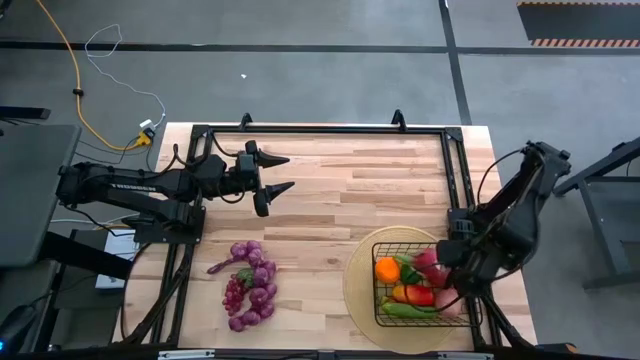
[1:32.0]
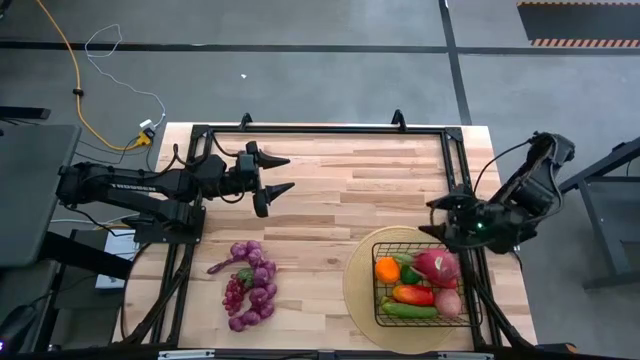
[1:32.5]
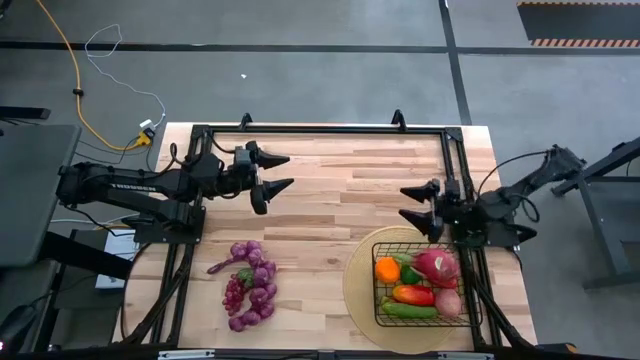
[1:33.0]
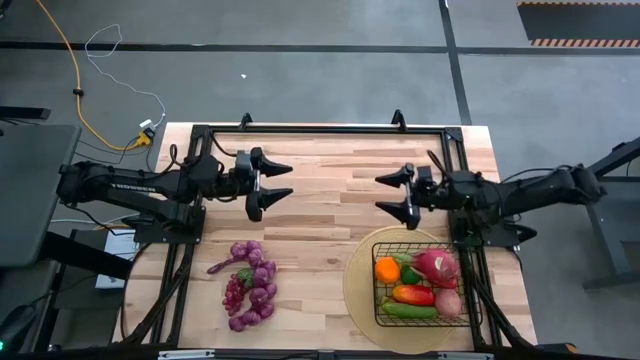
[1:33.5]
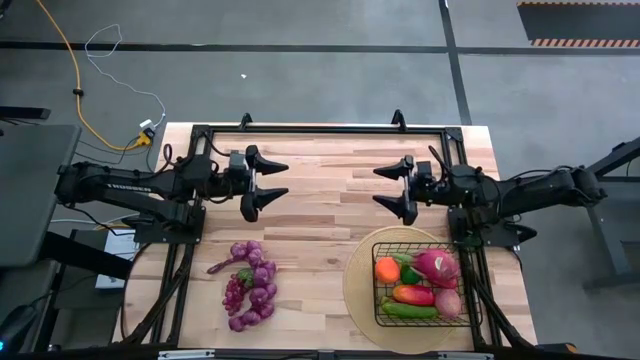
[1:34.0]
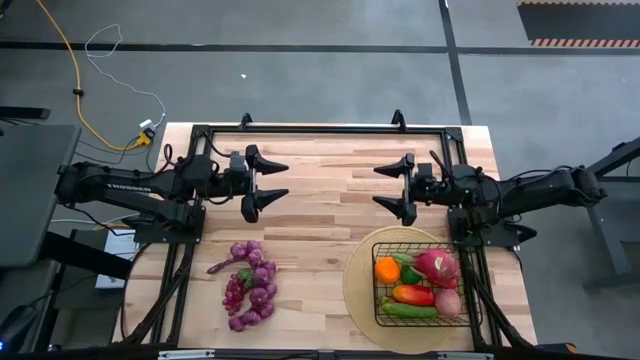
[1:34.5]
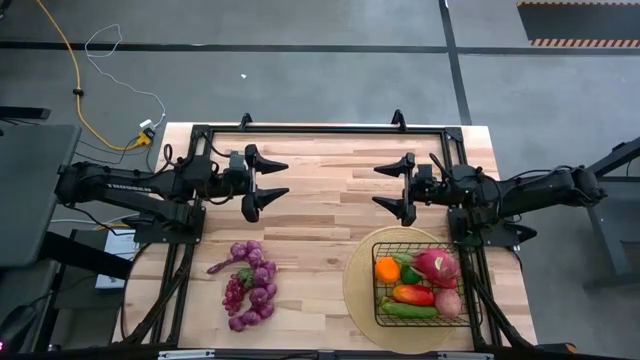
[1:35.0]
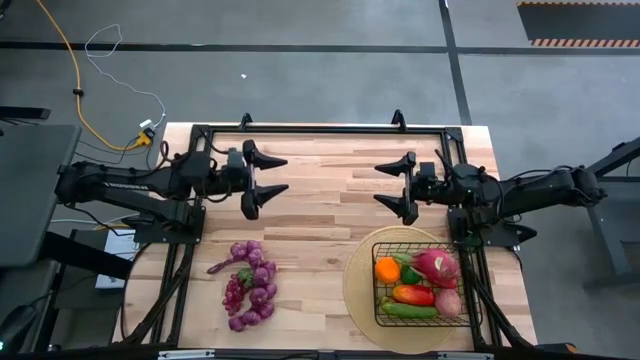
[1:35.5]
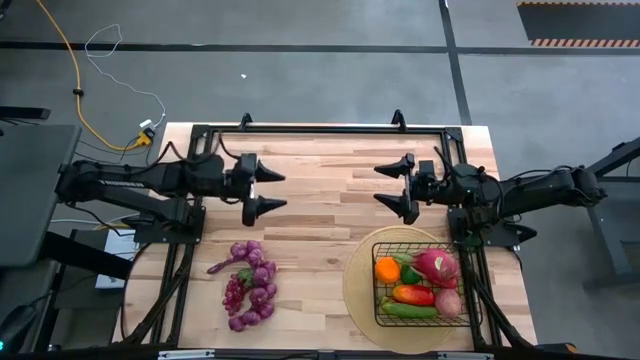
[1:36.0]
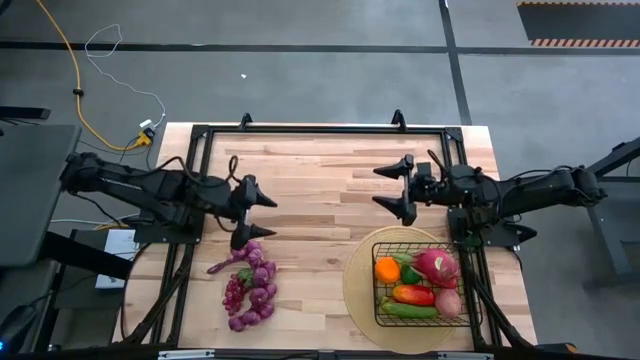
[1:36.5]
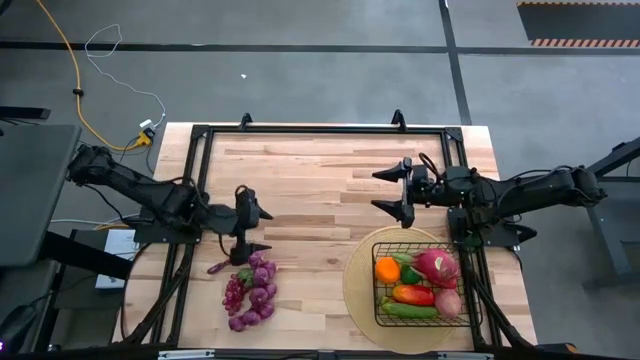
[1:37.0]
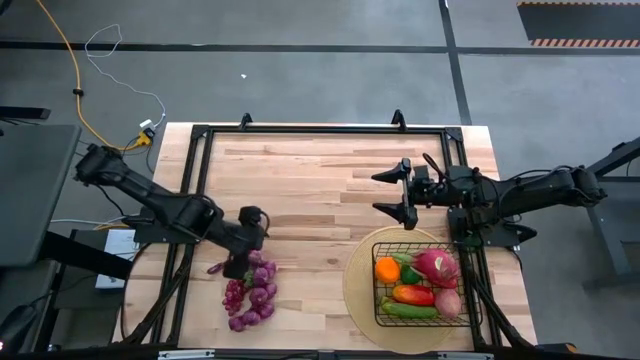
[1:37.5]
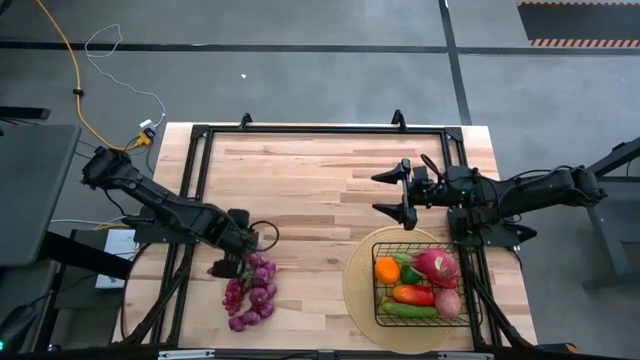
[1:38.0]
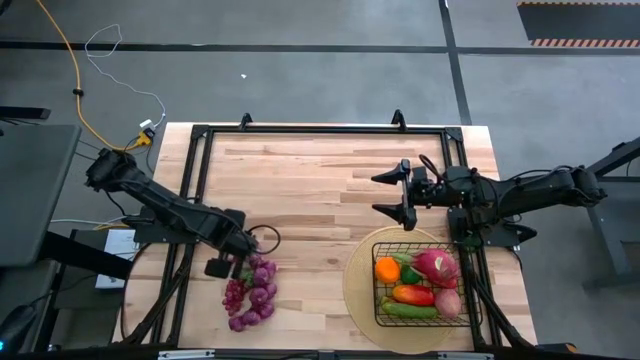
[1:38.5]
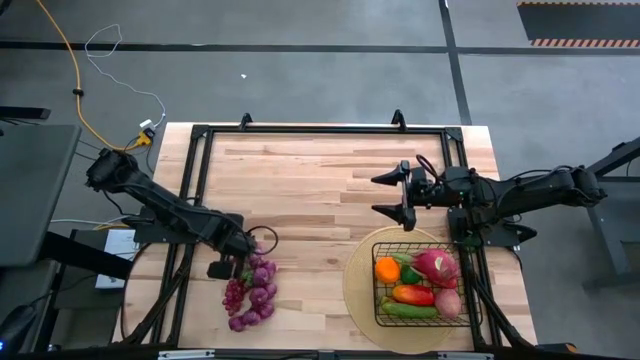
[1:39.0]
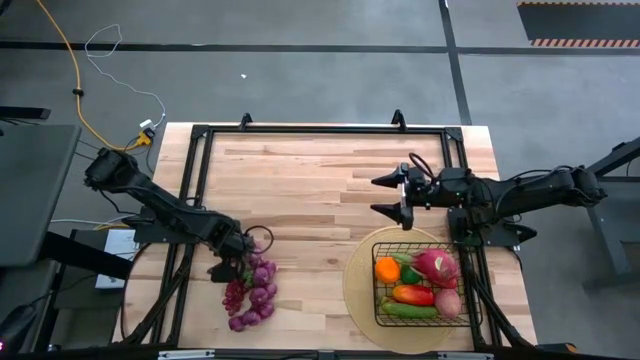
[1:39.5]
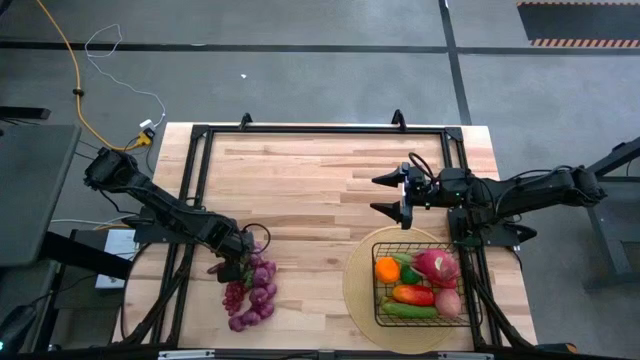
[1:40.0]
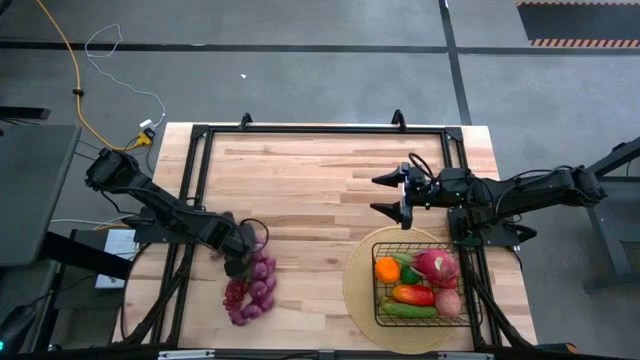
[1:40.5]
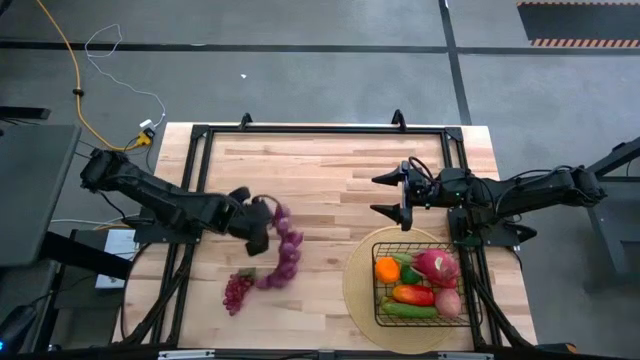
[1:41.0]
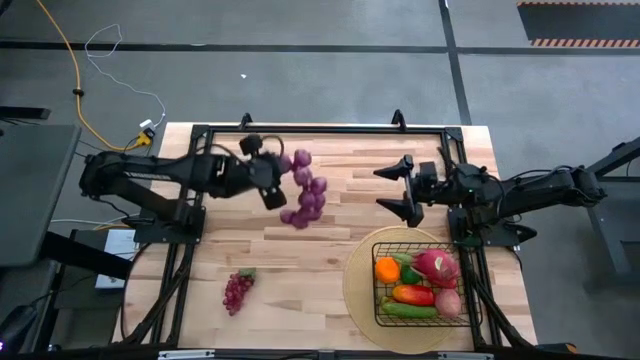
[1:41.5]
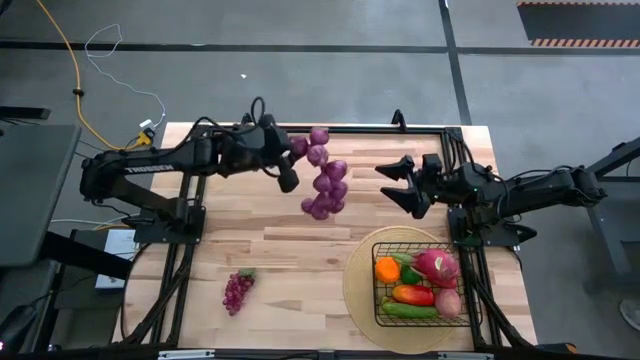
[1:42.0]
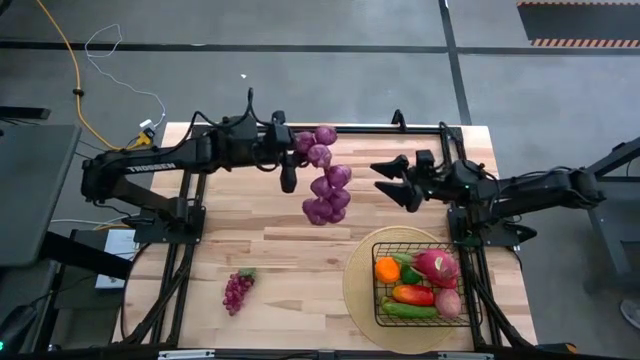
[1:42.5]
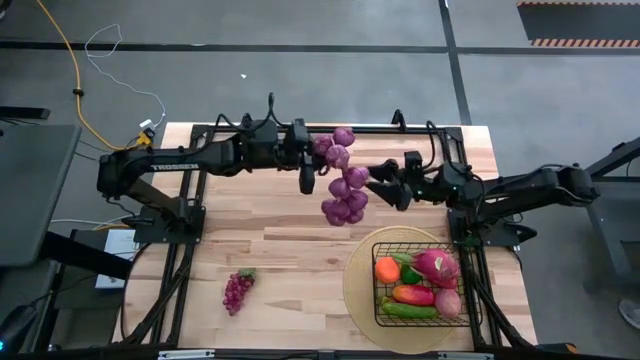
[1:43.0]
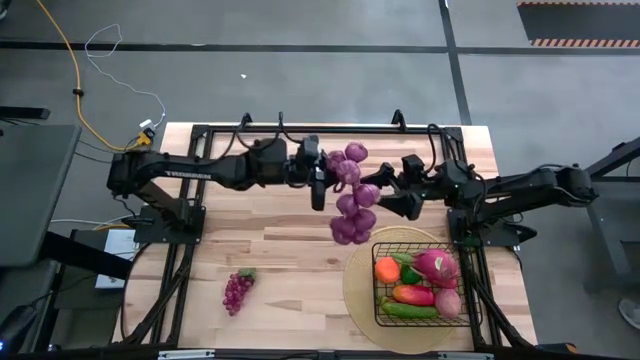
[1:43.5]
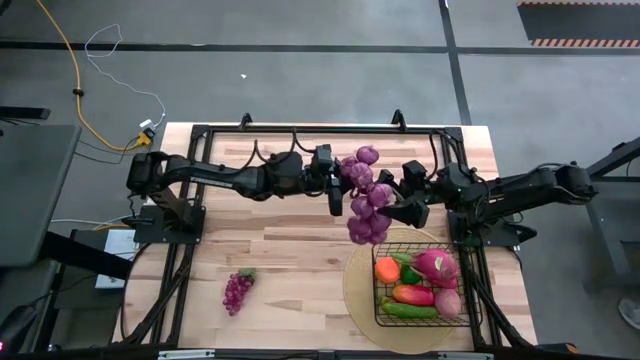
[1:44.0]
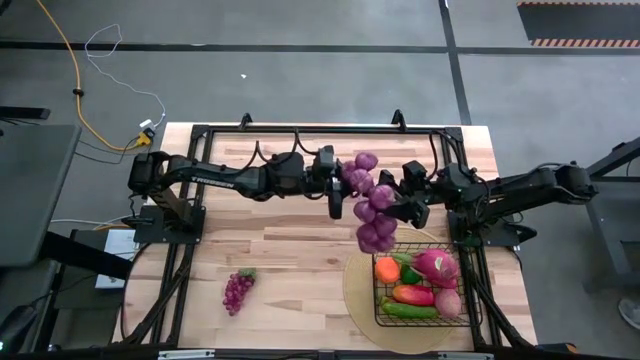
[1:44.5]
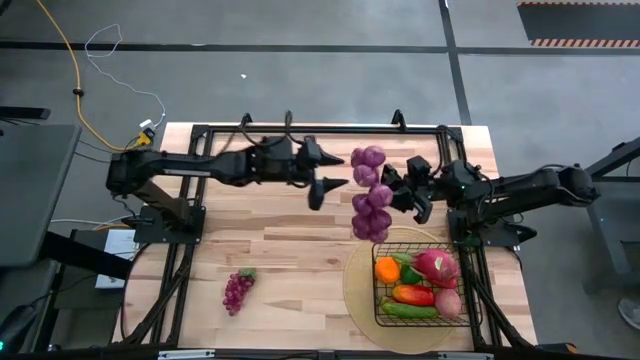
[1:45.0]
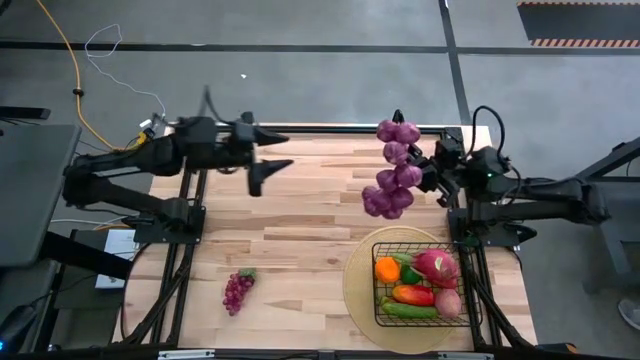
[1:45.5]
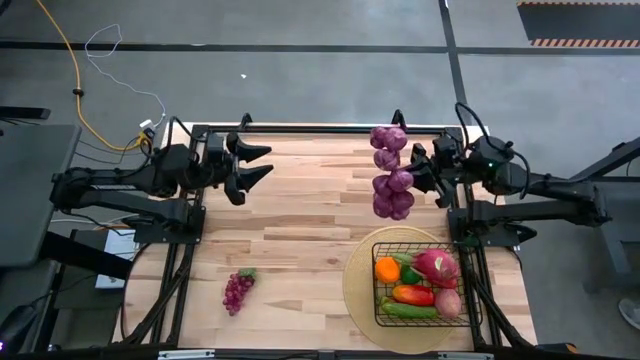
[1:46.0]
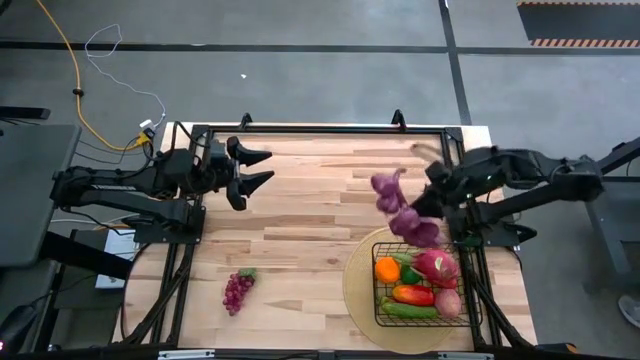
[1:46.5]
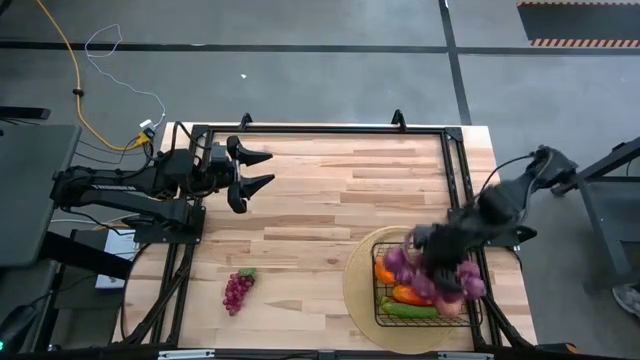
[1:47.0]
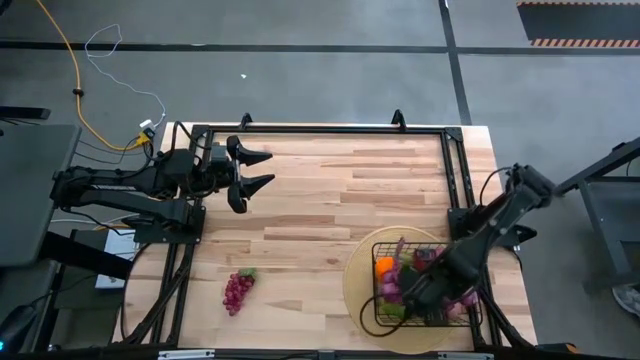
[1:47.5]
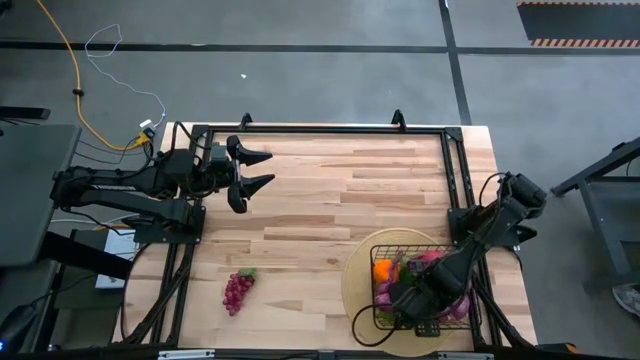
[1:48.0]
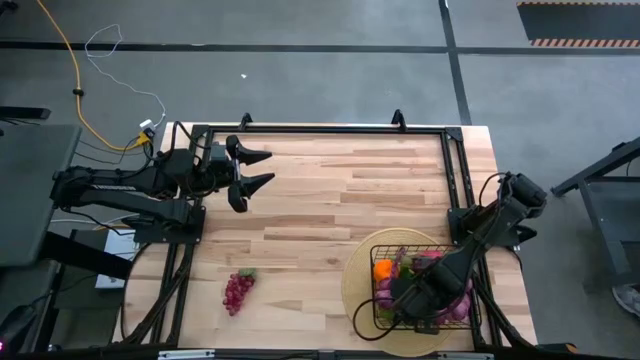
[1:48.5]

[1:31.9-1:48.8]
Task: Build produce basket
Put the purple garlic into the wire basket

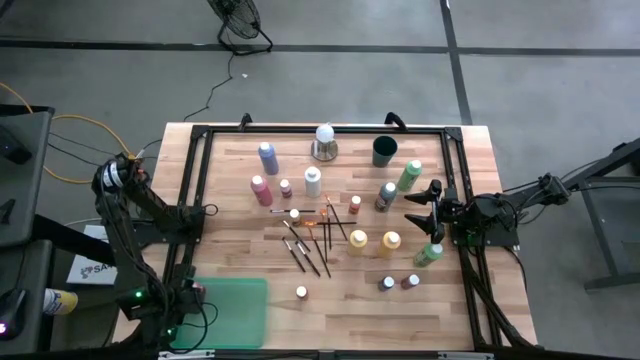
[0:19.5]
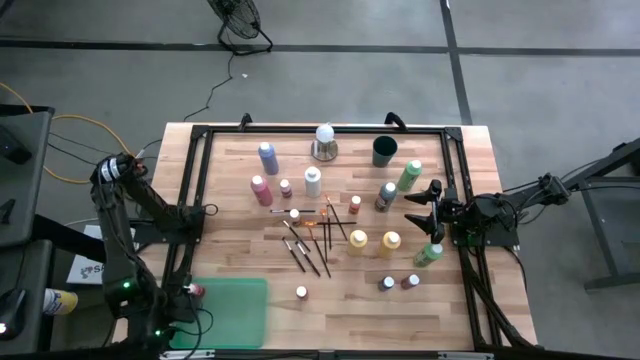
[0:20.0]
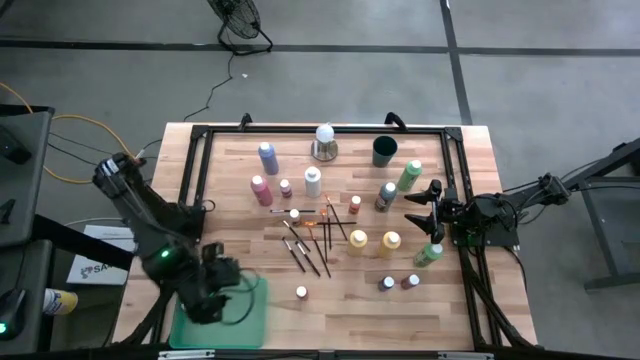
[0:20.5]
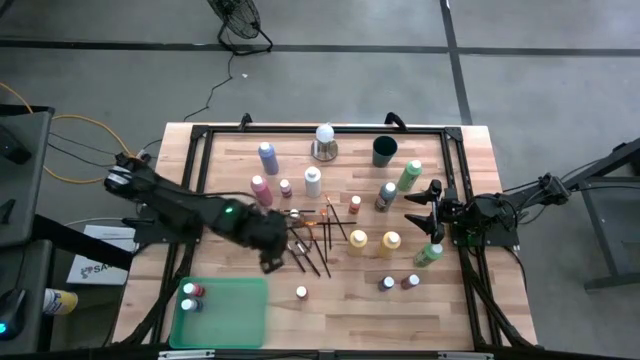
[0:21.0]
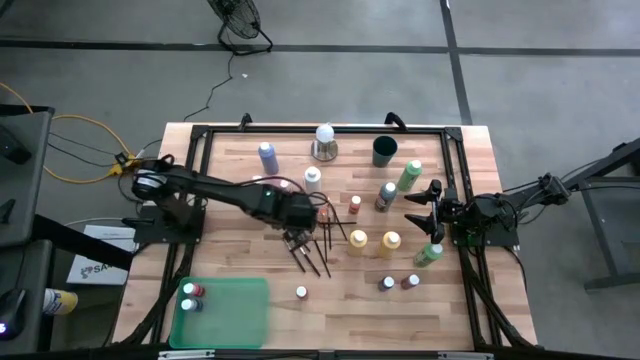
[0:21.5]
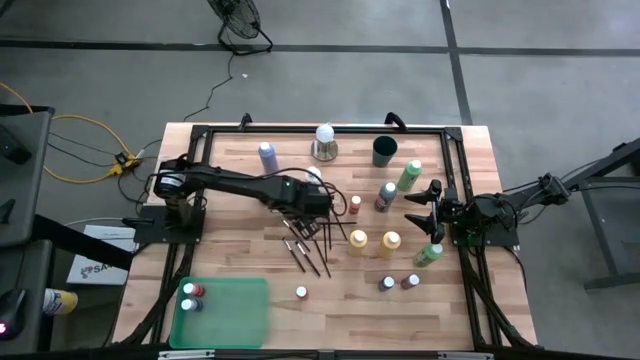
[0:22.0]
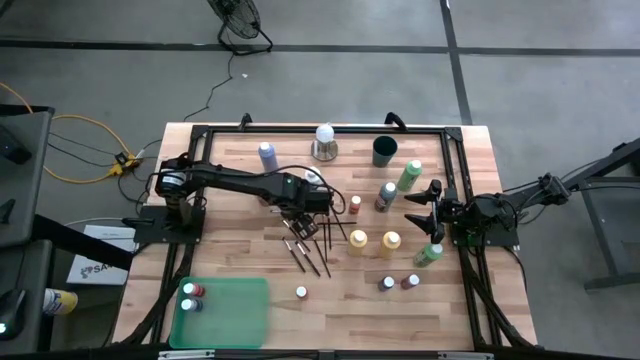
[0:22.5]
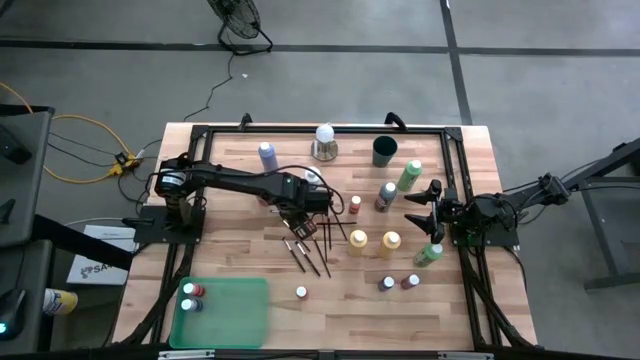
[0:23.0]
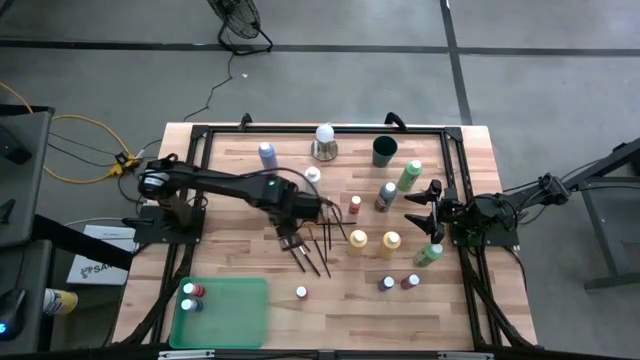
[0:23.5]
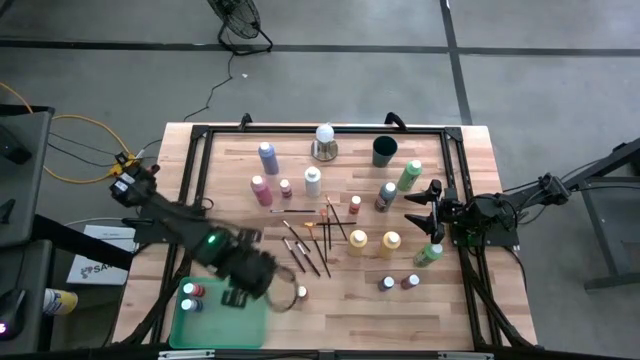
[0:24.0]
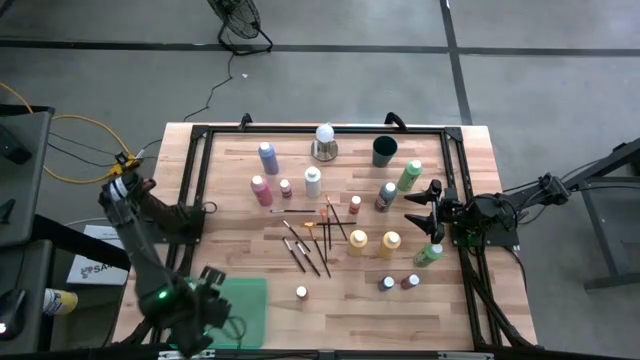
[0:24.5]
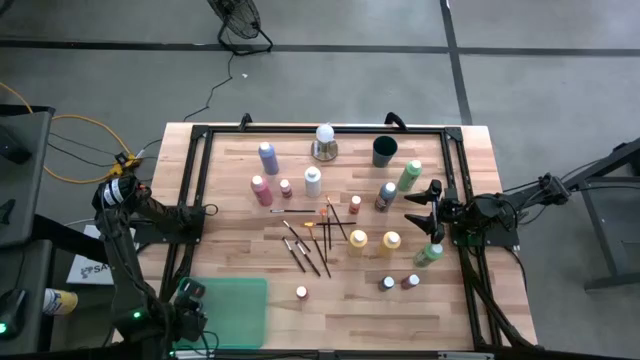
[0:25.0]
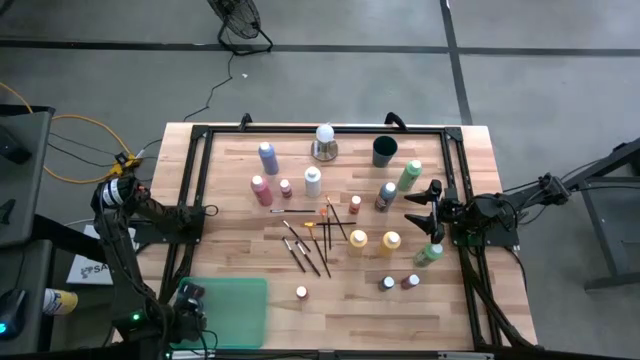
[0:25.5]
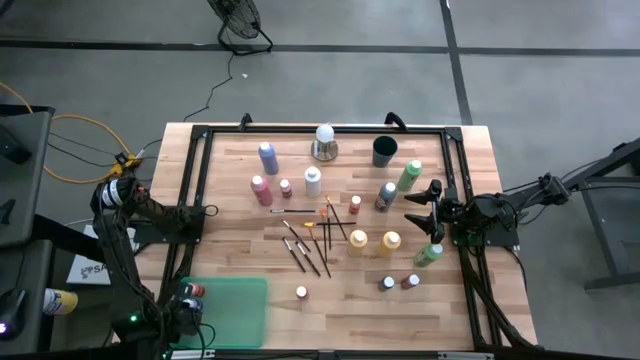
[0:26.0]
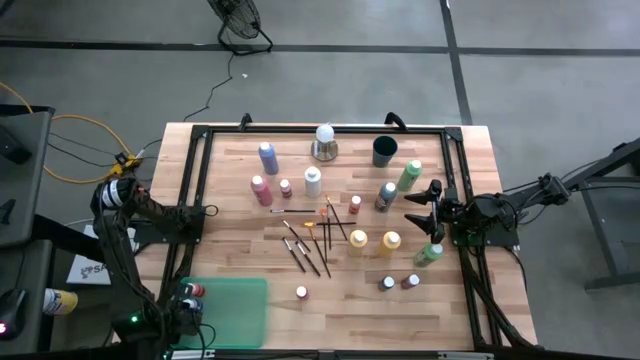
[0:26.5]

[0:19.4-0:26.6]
Task: Pick & Place Paint Supplies
Put the yellow paint bottle into the green bin
